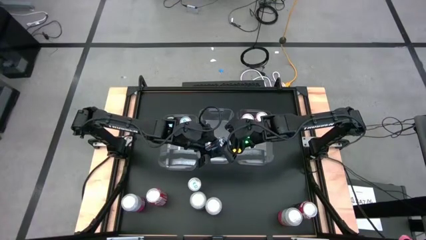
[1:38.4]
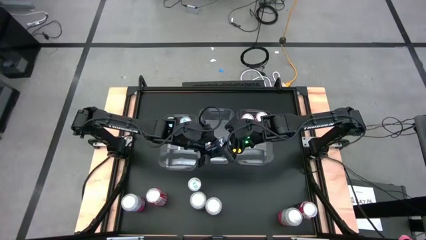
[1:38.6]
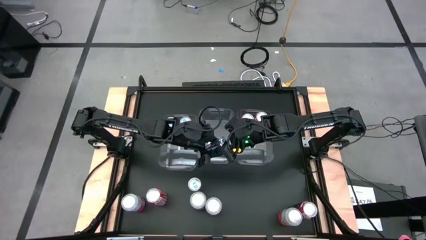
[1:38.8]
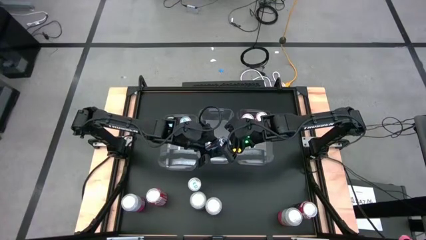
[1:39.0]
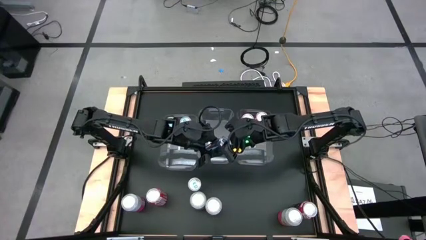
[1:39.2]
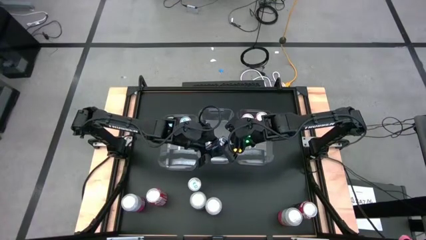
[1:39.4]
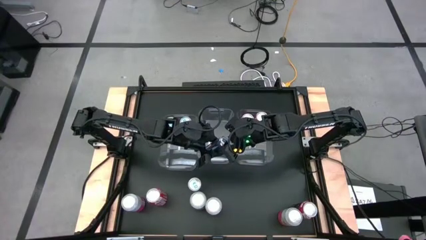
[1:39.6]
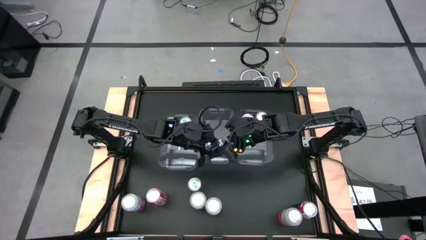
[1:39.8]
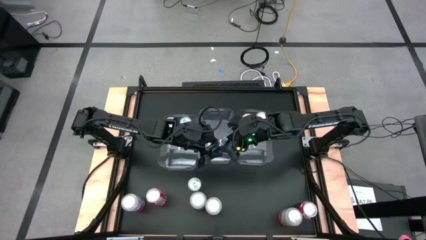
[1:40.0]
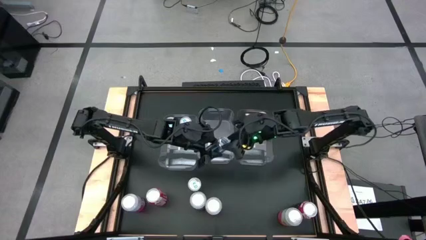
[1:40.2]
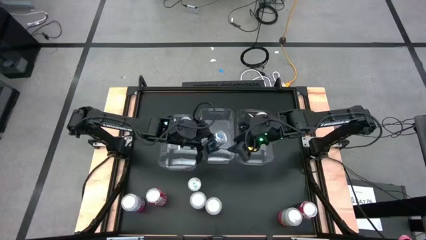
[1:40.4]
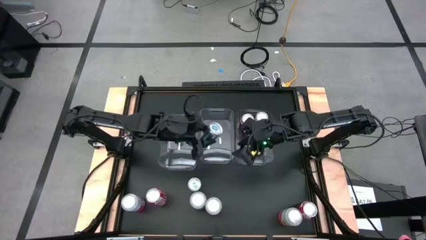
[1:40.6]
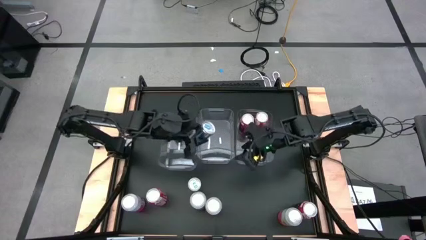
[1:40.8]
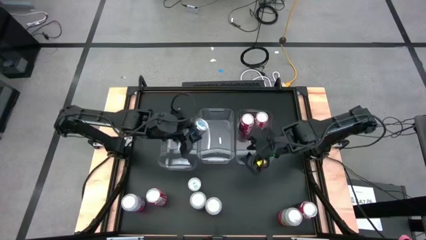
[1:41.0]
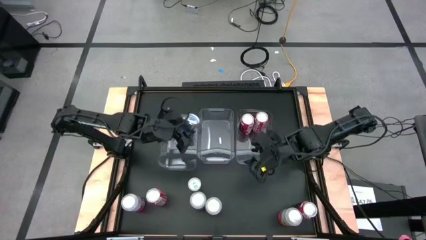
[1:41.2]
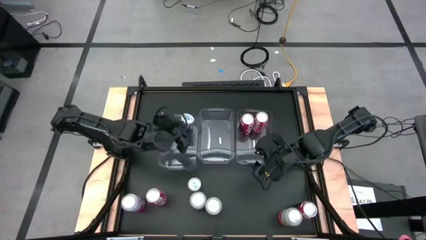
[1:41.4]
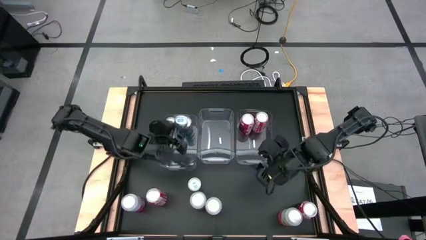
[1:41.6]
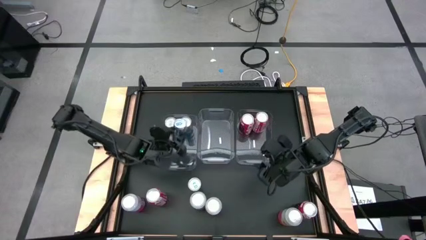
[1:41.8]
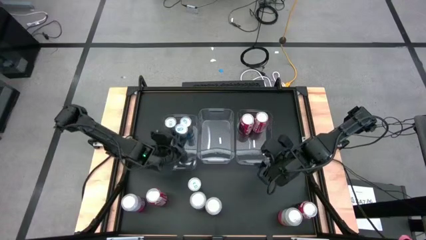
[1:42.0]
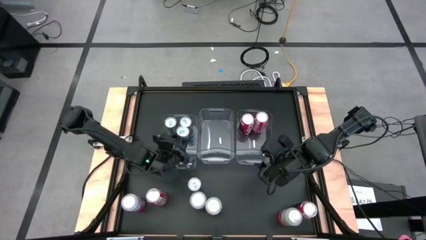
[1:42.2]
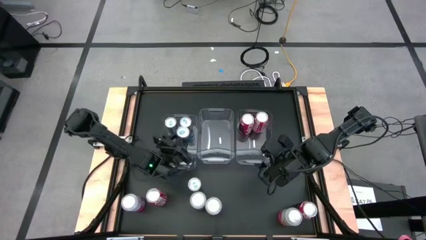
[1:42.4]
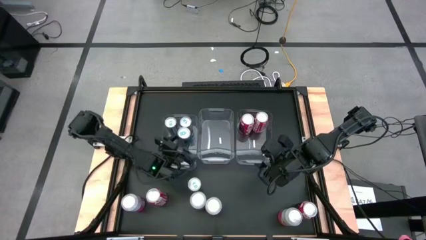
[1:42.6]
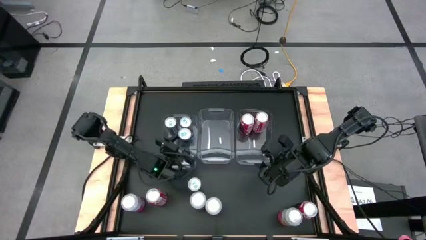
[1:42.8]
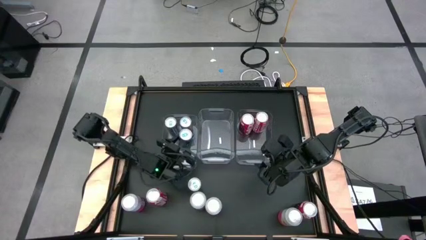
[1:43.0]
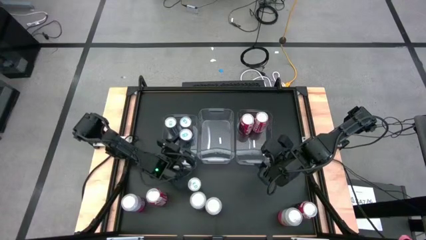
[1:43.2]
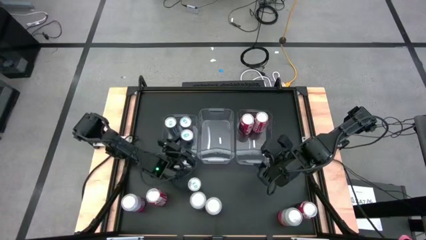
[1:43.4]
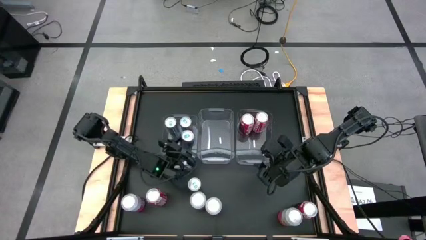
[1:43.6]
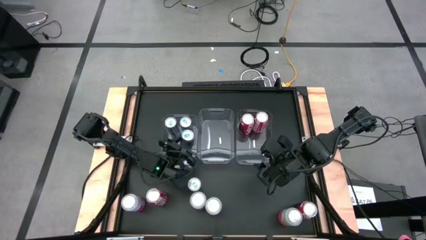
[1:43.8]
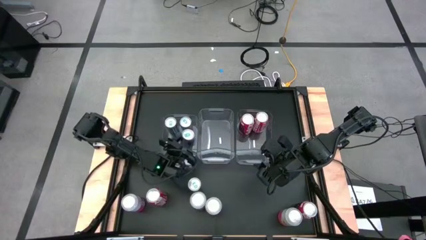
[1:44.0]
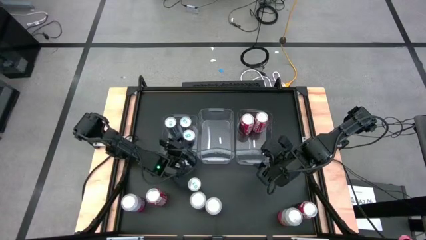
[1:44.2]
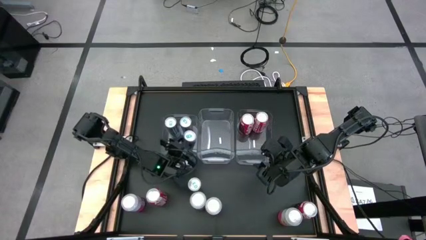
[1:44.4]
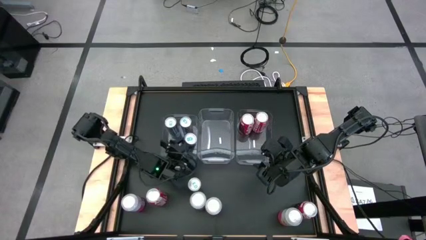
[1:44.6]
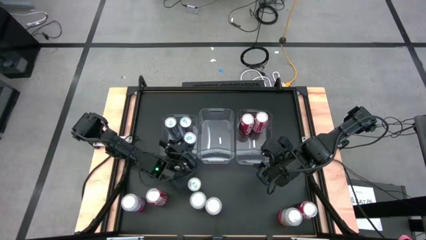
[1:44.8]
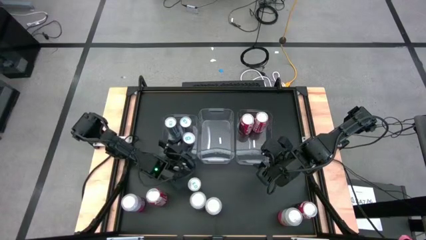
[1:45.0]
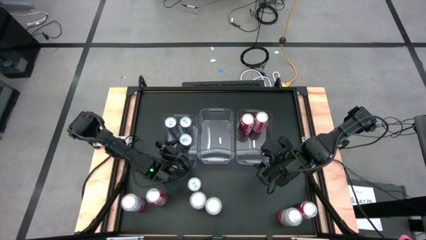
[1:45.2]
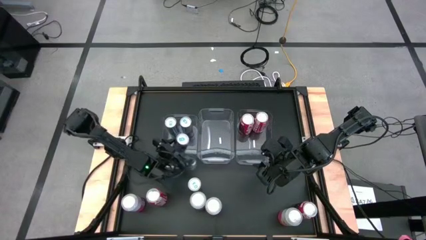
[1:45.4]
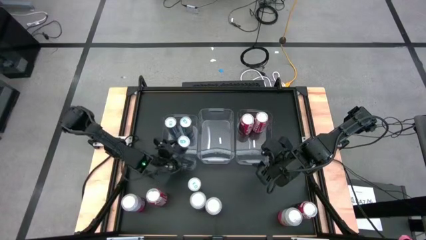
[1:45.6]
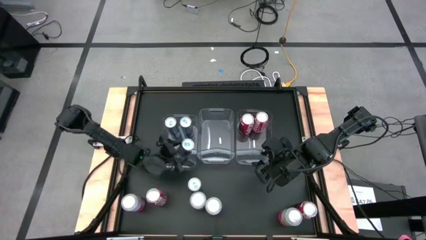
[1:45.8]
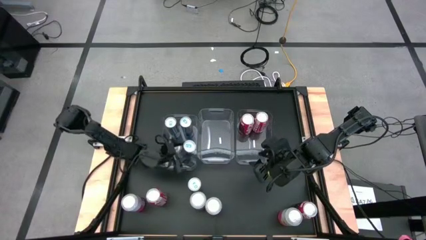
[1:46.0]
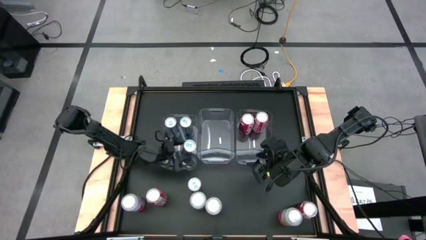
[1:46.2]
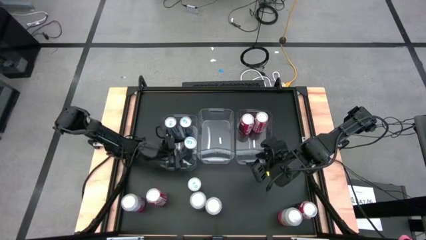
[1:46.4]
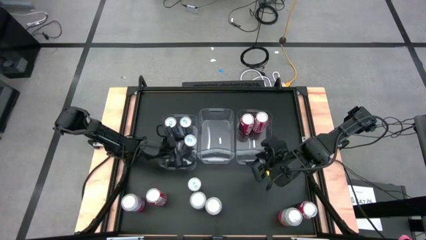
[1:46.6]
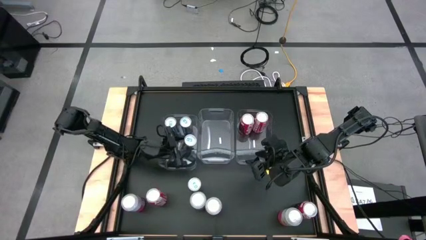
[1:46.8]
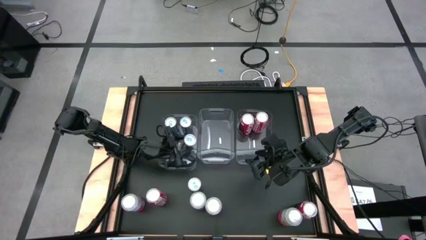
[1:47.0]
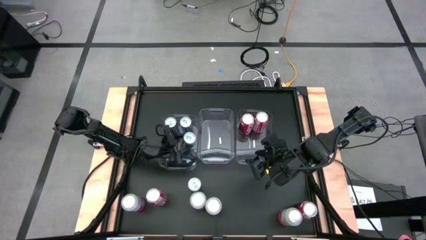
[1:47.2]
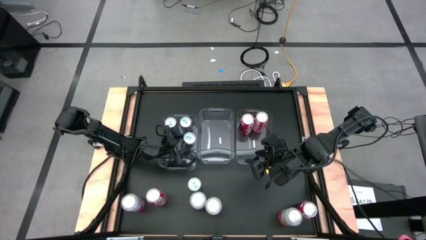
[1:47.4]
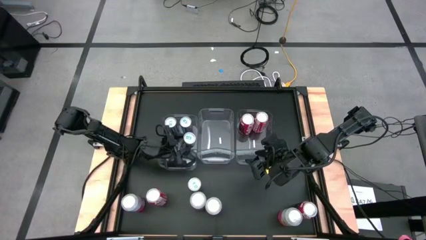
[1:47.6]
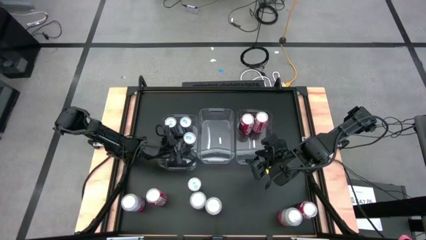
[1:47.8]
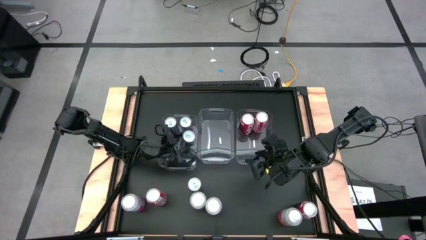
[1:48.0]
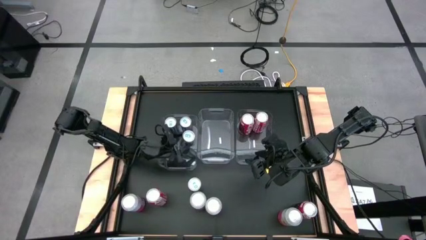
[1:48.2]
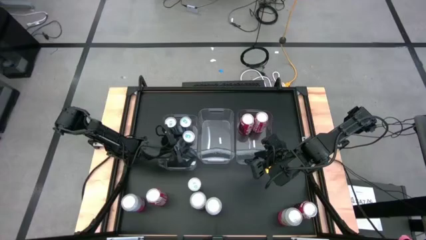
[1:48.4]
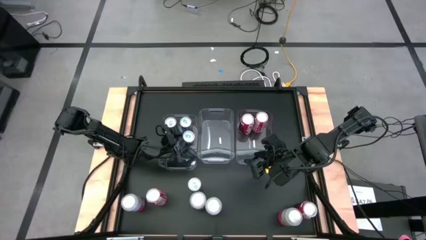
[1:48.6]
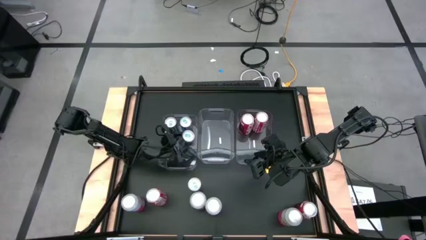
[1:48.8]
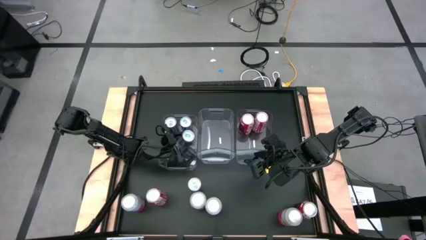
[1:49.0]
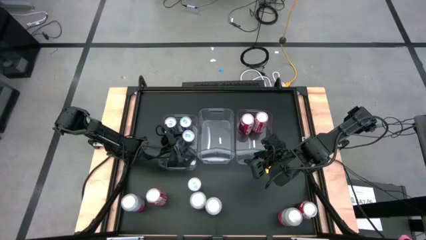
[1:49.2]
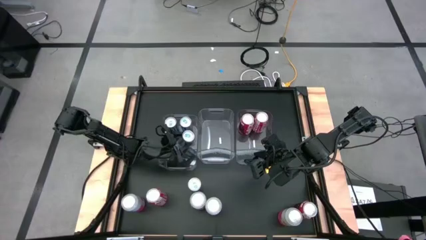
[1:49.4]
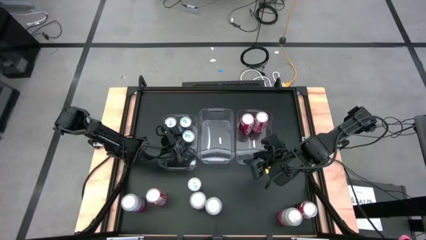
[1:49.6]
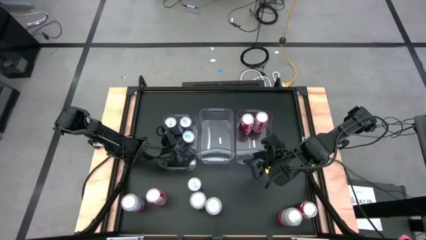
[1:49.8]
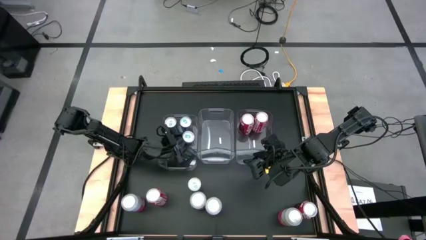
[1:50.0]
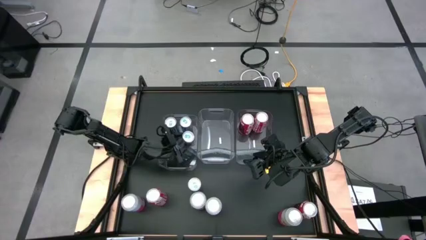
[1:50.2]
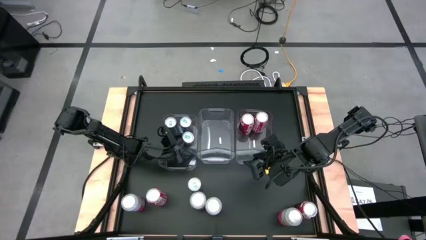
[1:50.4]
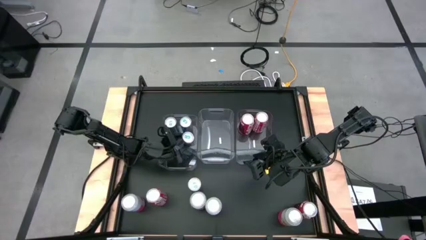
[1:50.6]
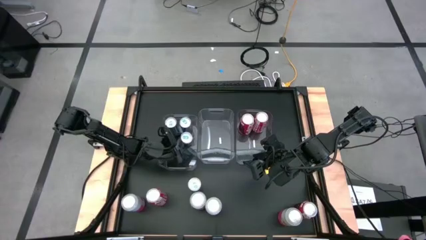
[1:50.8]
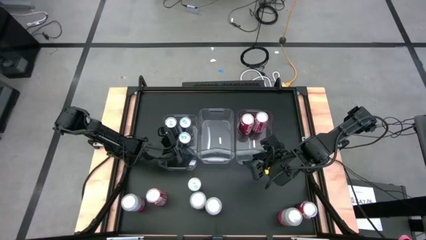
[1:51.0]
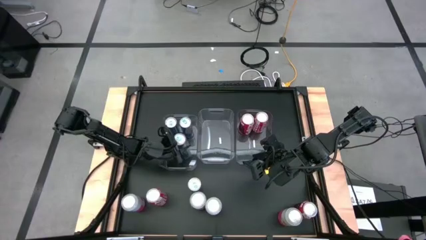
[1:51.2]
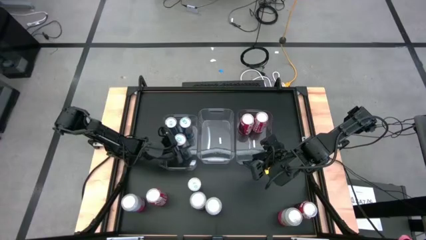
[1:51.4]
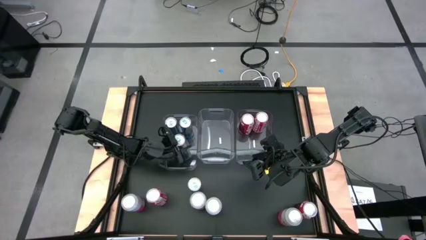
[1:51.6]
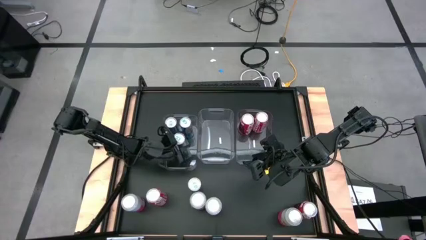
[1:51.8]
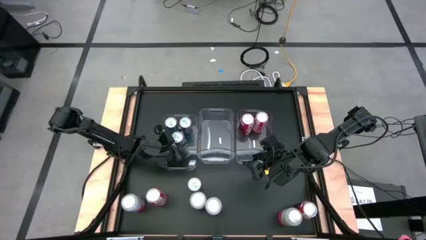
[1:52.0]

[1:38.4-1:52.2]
Task: Sort soda cans
Put the bottom right blue soda can into the left transparent bin

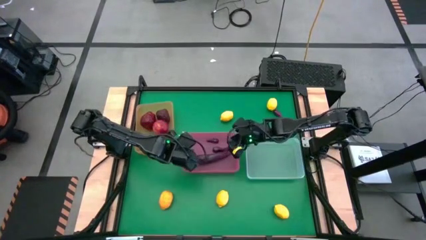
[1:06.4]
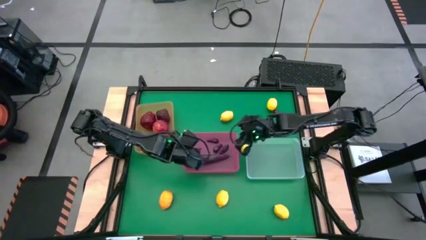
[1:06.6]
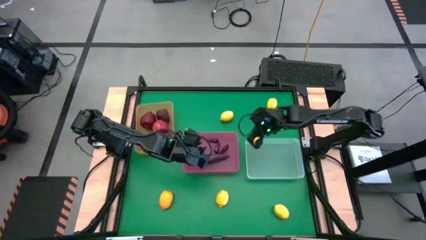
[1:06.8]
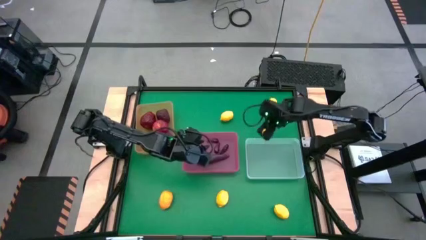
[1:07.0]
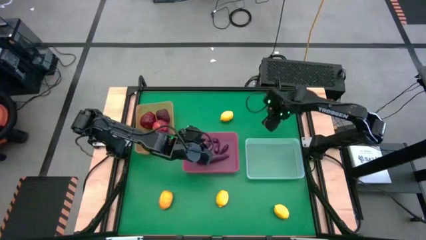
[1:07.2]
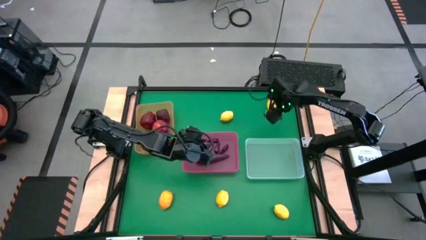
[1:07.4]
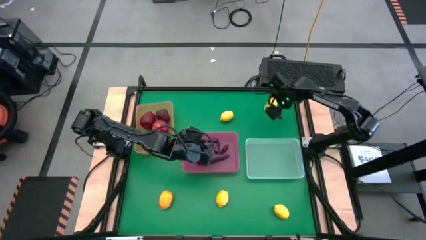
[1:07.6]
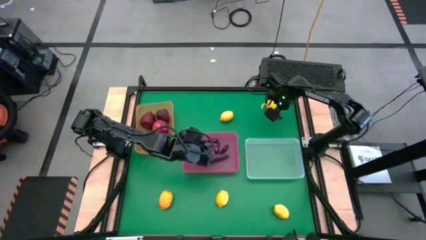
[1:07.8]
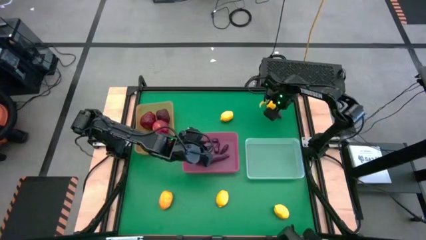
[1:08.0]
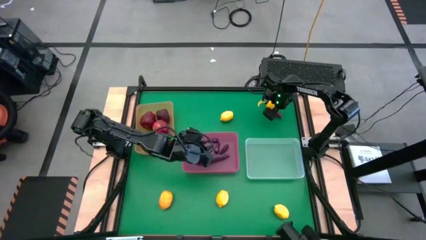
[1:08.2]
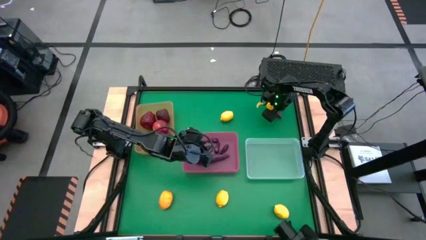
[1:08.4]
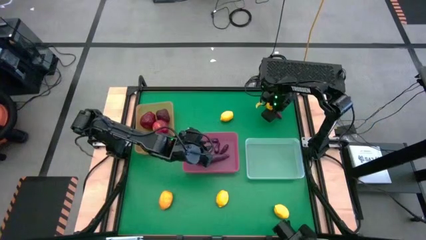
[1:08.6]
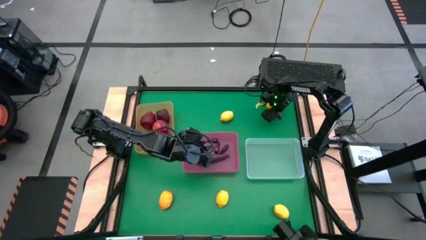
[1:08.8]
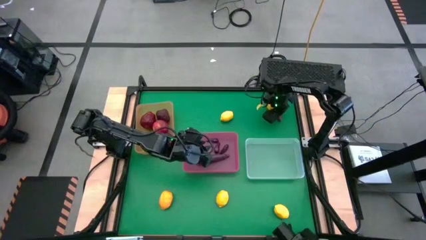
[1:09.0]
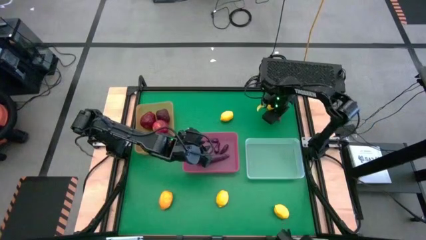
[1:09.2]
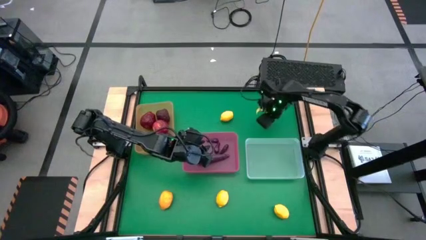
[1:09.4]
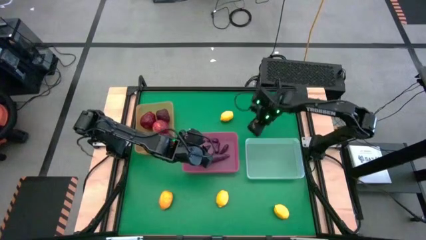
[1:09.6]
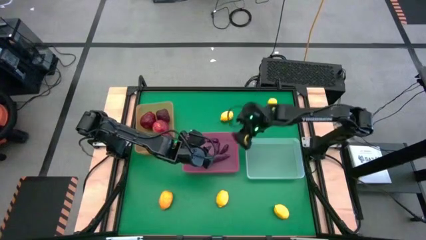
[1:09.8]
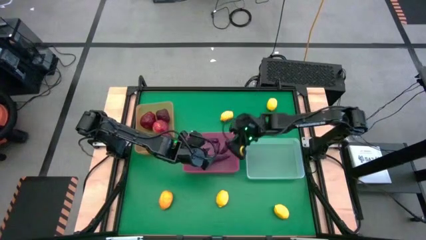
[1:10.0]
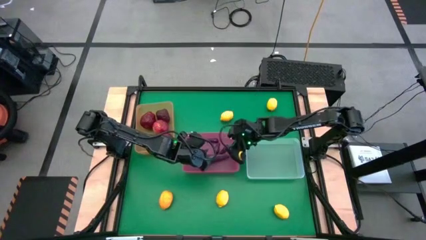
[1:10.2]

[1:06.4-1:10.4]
Task: Sort produce into baskets
Put the violet eggplant into the pink bin
